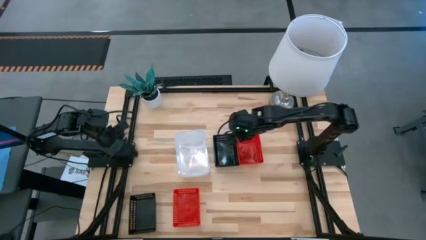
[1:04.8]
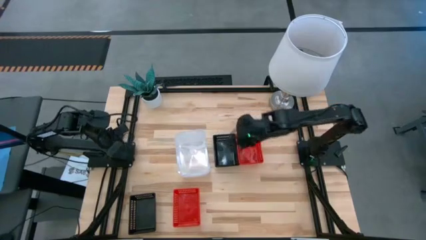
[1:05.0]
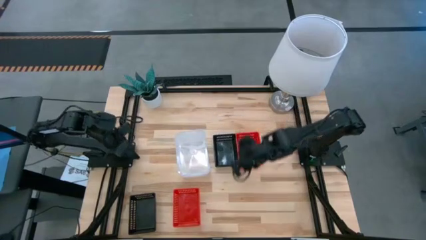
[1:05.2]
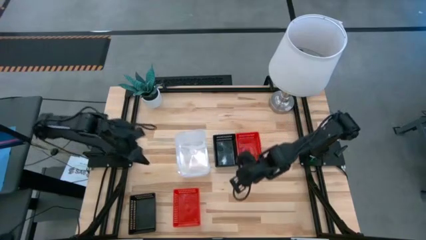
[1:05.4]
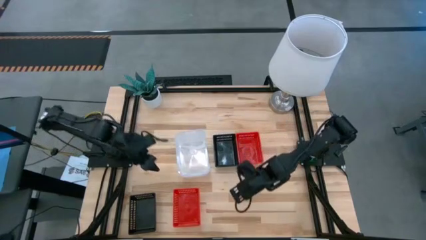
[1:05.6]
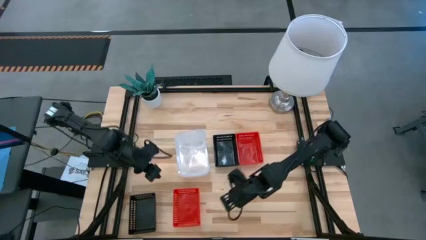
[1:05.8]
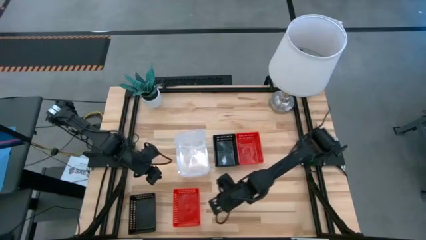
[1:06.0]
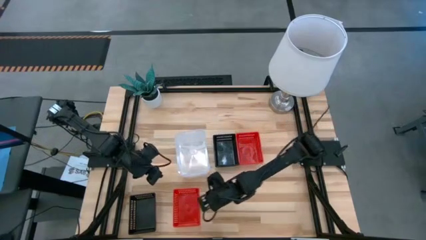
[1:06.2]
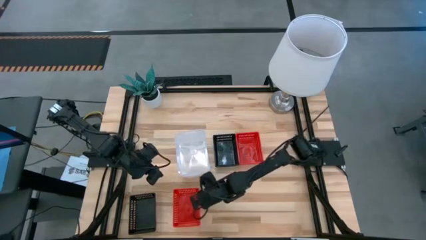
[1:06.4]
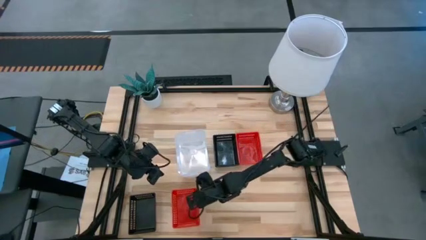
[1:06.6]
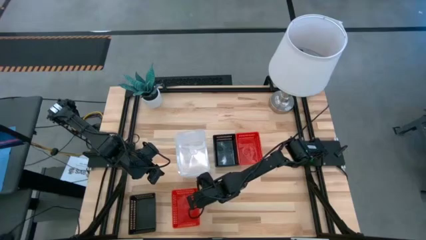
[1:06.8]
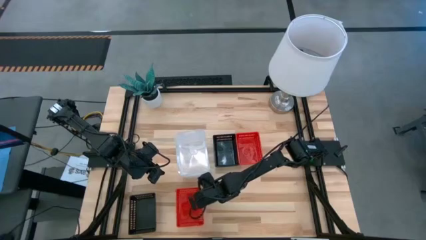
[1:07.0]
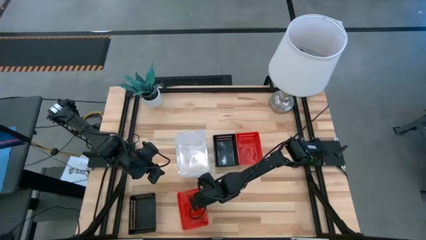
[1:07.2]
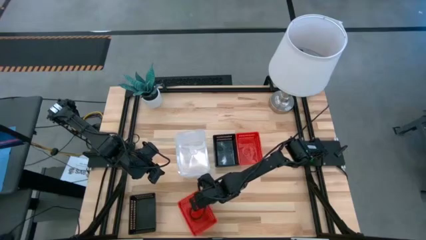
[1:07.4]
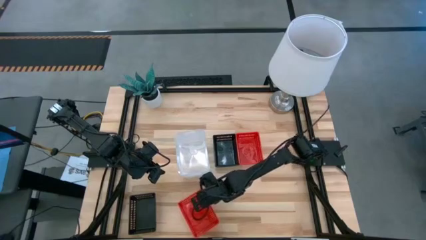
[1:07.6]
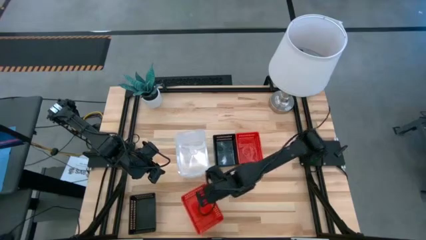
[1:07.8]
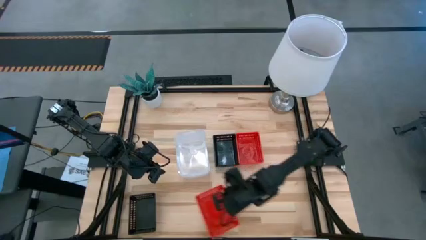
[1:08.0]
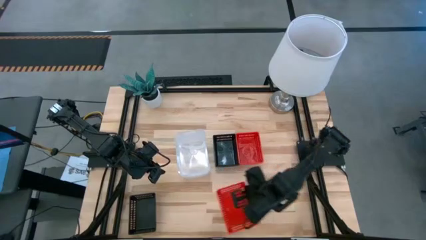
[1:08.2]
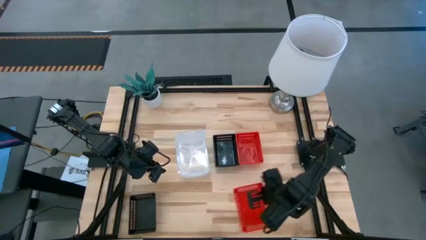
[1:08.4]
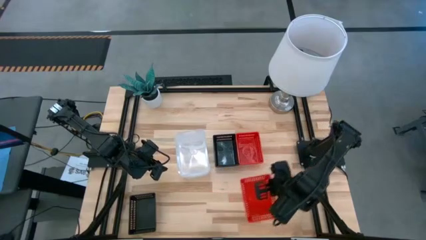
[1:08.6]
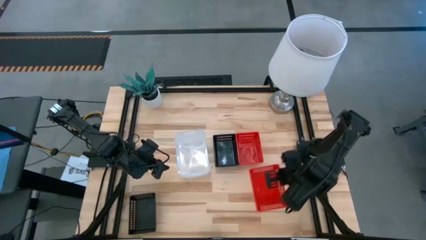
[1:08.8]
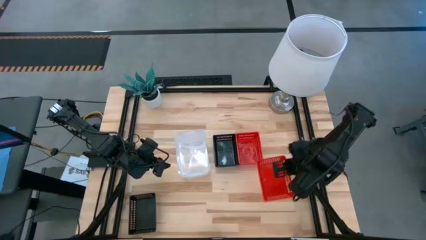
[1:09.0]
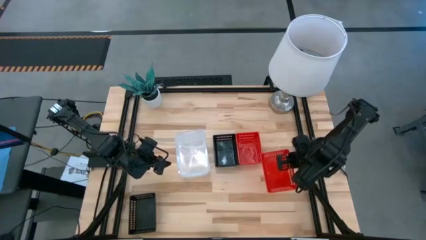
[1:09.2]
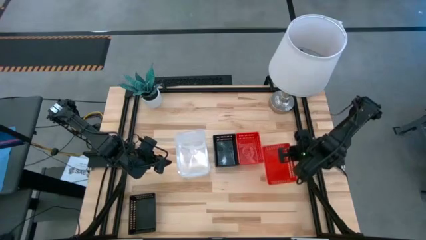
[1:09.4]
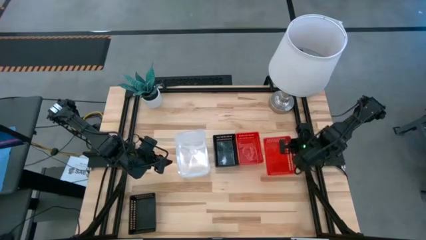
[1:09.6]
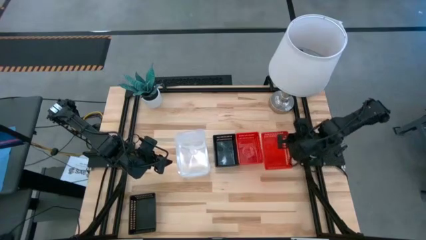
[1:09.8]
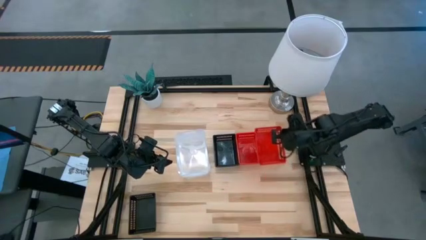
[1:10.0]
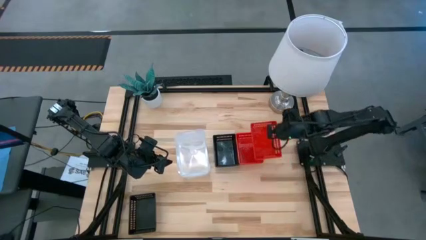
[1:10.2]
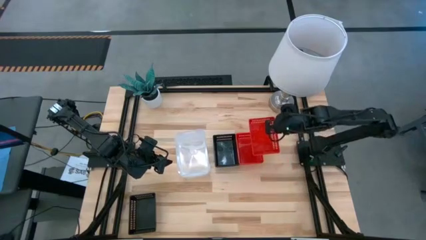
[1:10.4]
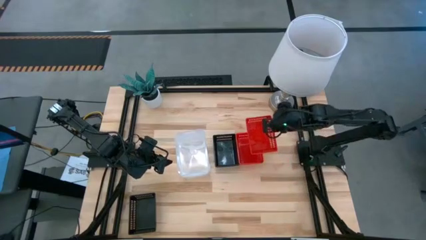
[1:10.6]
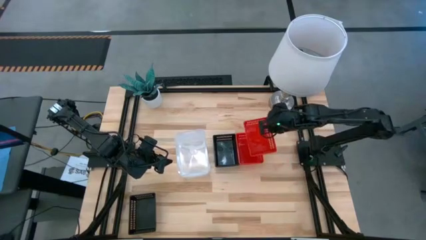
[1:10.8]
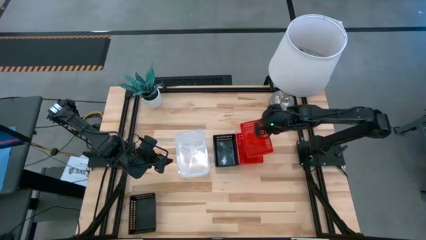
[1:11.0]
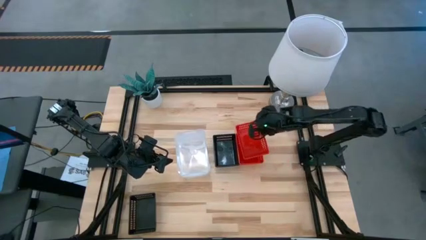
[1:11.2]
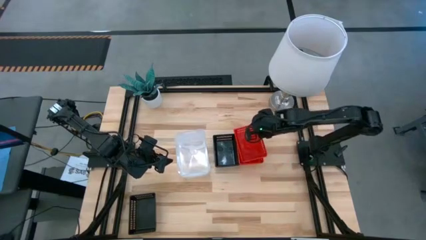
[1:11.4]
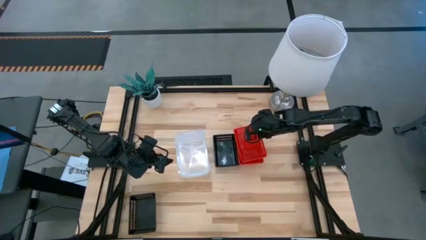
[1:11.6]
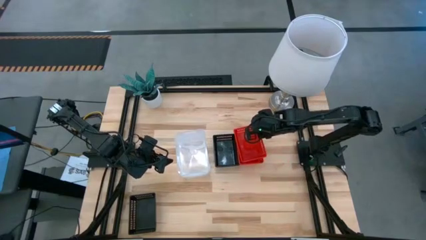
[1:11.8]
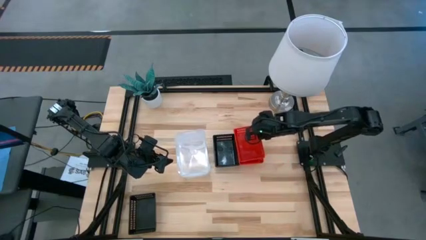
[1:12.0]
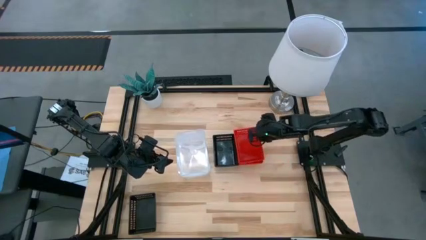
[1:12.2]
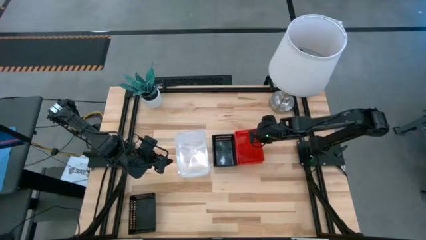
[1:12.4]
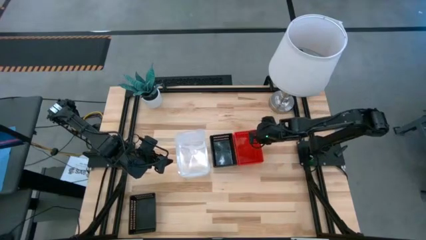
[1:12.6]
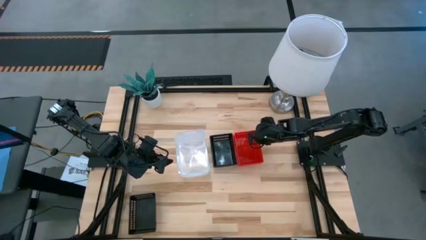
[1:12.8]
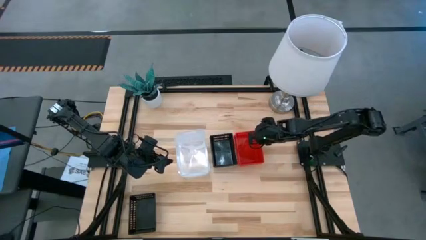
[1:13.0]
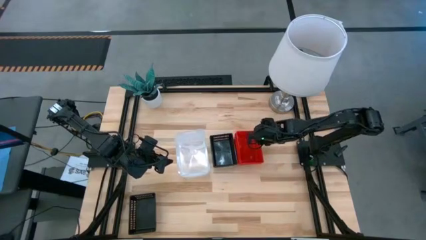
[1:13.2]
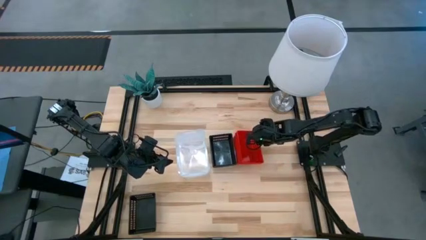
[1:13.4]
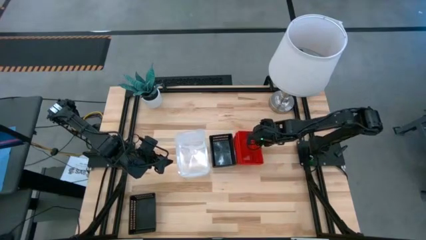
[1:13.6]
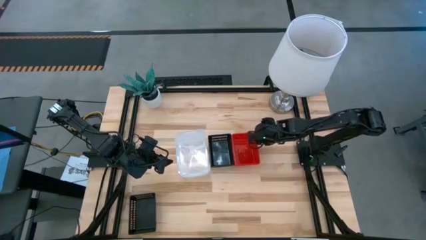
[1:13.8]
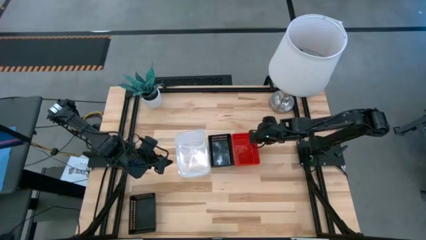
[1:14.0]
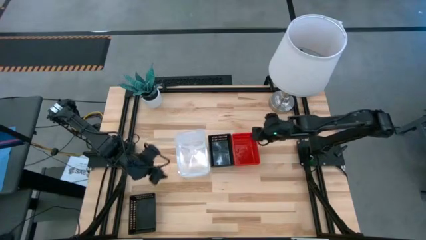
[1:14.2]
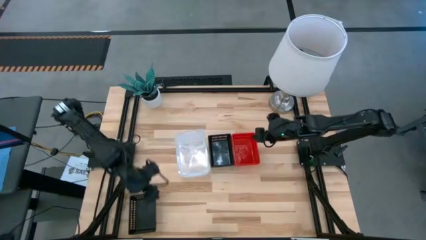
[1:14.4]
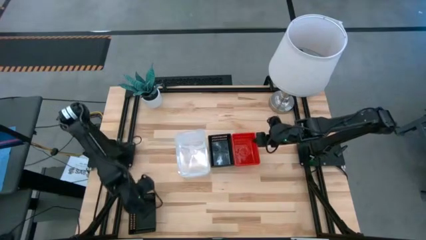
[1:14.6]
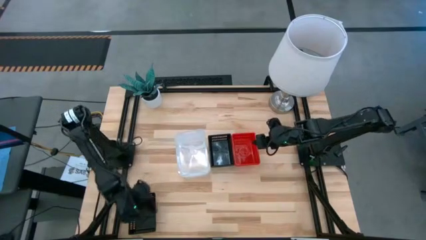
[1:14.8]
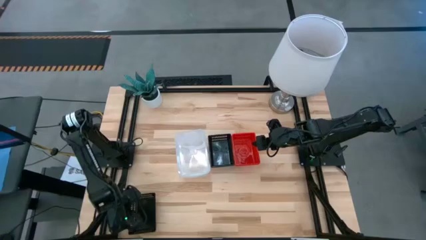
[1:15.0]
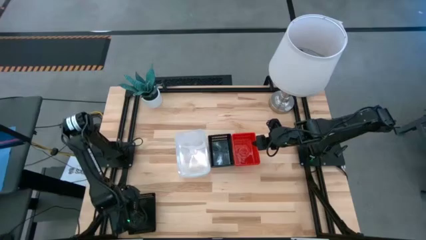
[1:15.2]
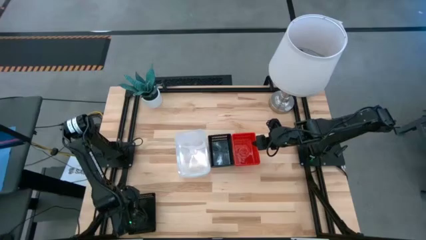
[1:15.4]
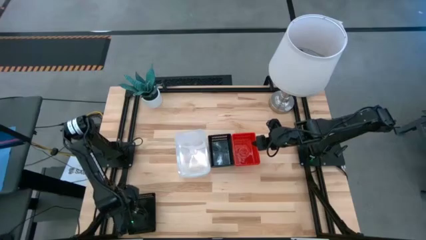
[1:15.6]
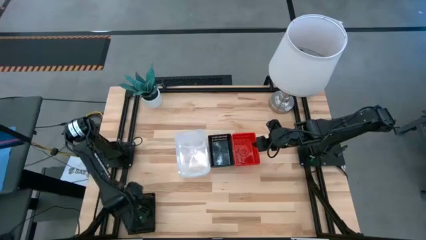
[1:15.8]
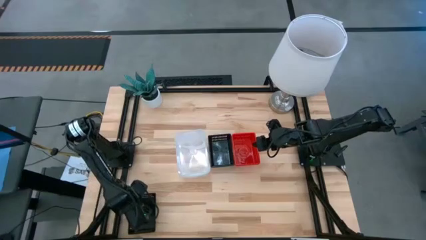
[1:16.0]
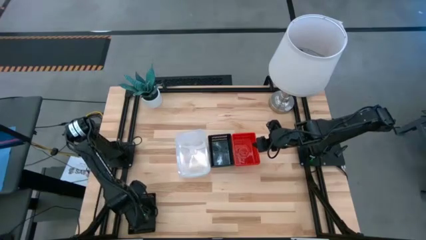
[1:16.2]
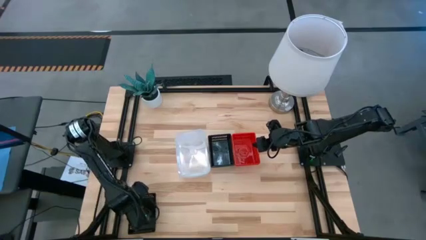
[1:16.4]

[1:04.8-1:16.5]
Stack the bottom red bin on the top red bin
